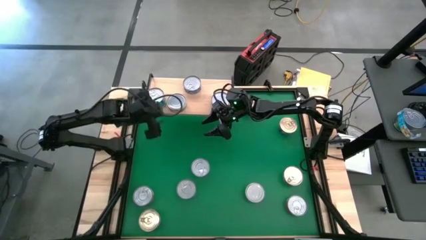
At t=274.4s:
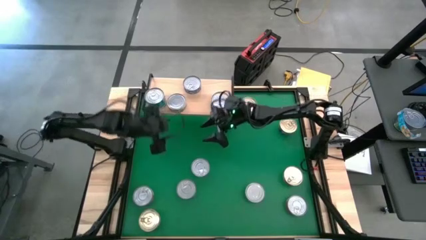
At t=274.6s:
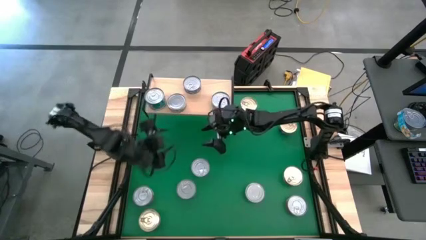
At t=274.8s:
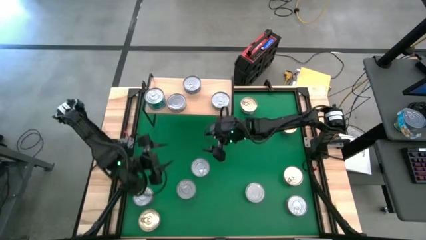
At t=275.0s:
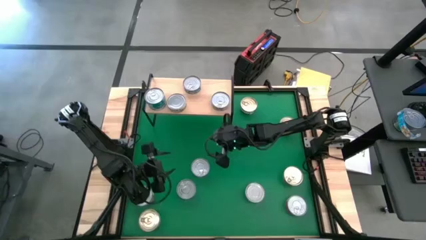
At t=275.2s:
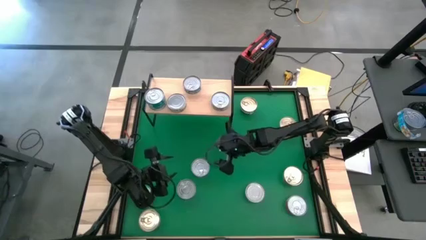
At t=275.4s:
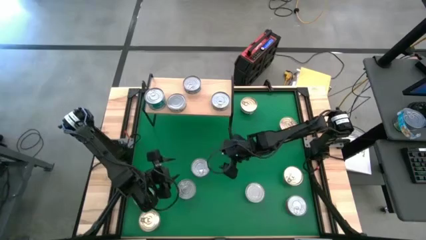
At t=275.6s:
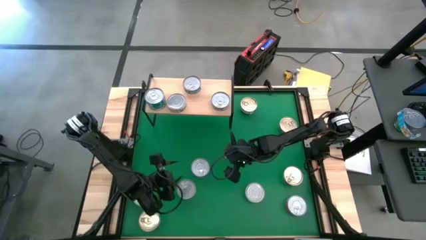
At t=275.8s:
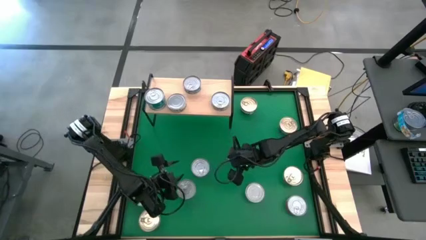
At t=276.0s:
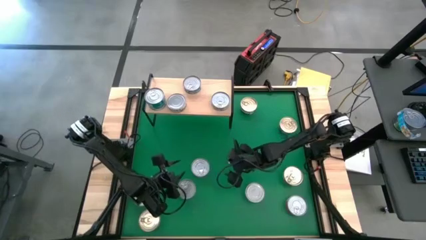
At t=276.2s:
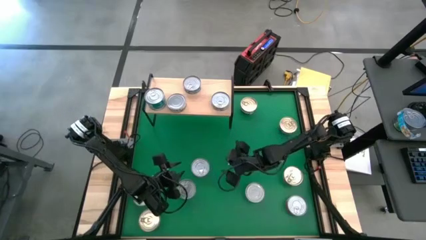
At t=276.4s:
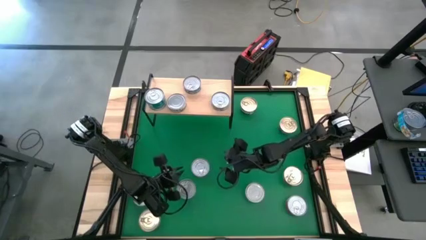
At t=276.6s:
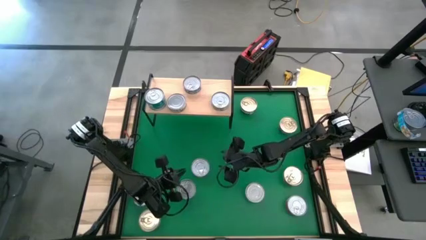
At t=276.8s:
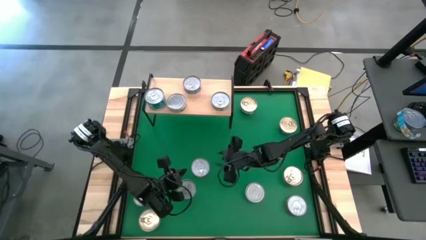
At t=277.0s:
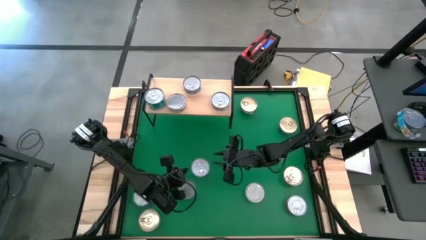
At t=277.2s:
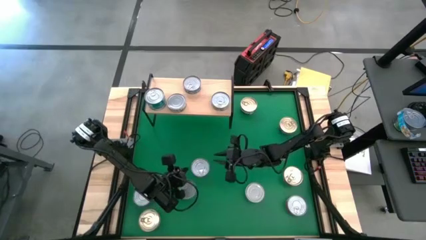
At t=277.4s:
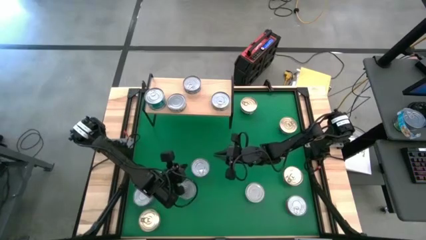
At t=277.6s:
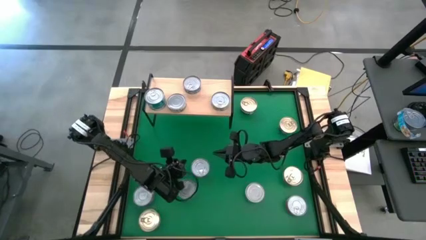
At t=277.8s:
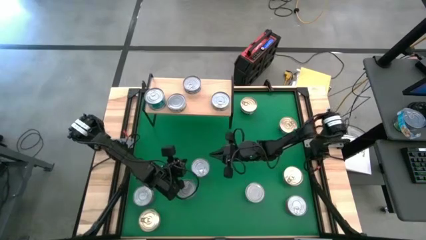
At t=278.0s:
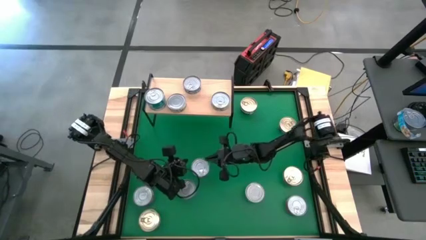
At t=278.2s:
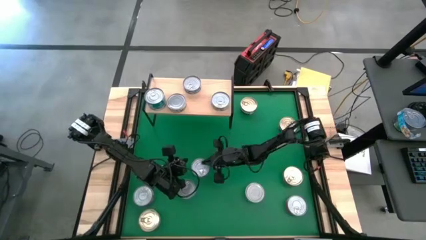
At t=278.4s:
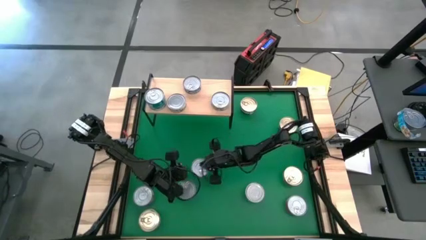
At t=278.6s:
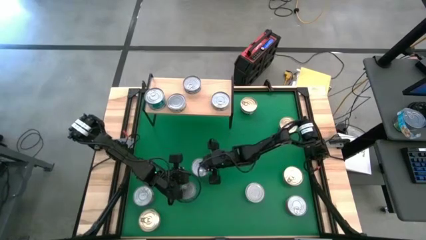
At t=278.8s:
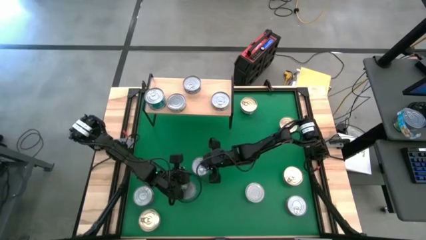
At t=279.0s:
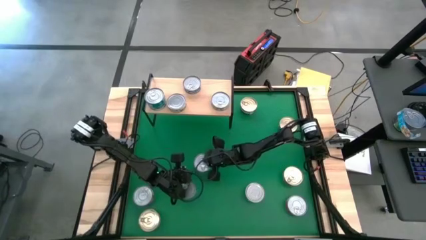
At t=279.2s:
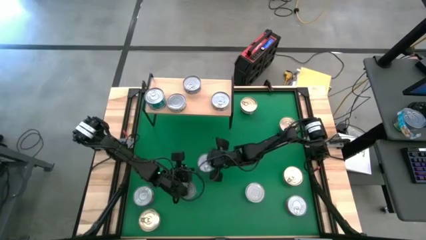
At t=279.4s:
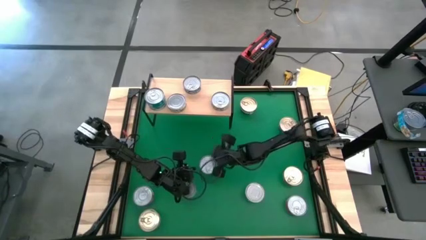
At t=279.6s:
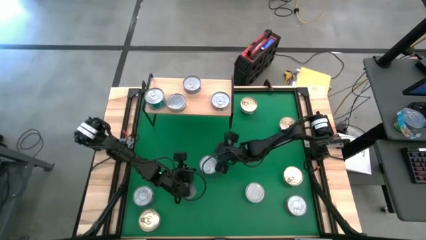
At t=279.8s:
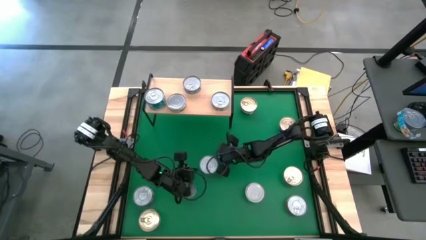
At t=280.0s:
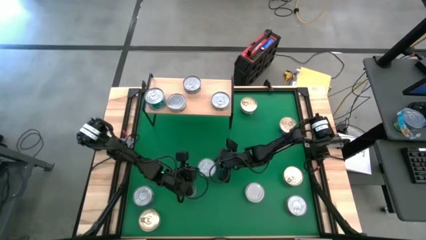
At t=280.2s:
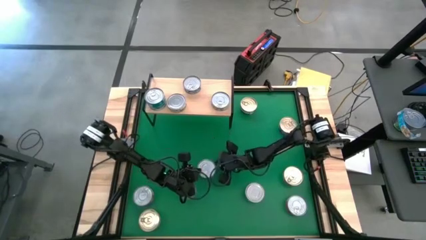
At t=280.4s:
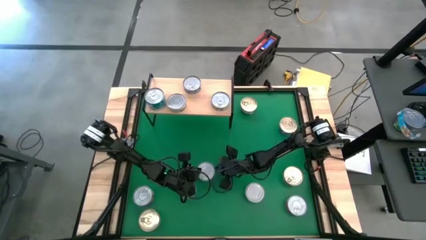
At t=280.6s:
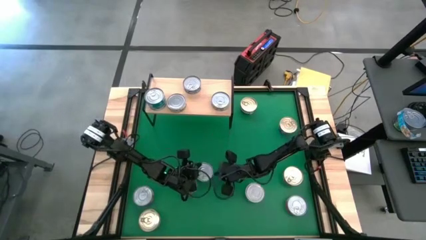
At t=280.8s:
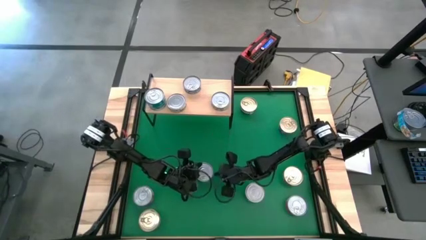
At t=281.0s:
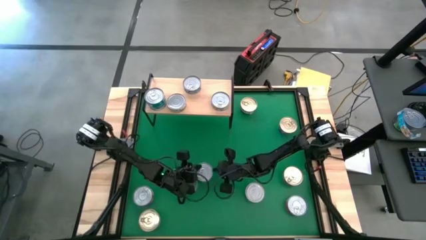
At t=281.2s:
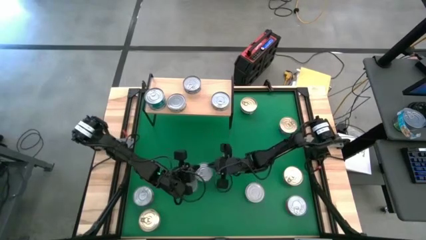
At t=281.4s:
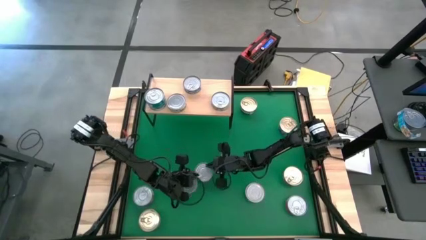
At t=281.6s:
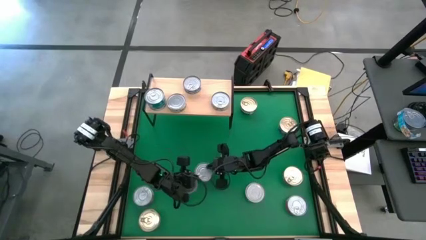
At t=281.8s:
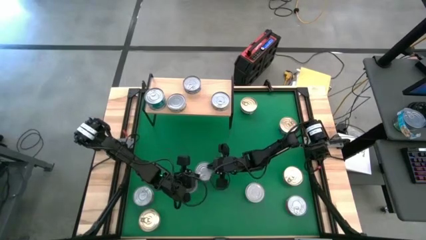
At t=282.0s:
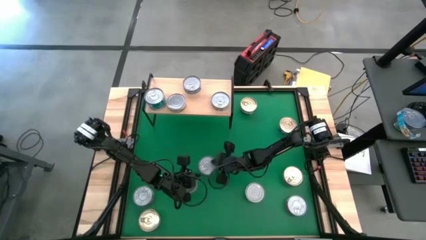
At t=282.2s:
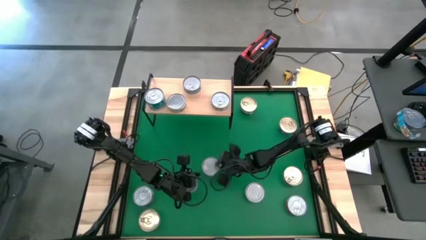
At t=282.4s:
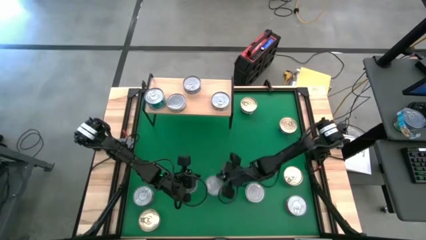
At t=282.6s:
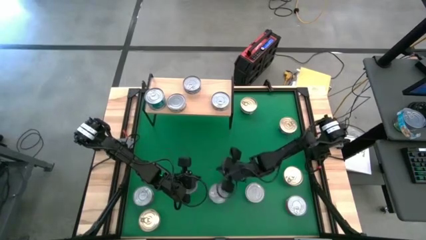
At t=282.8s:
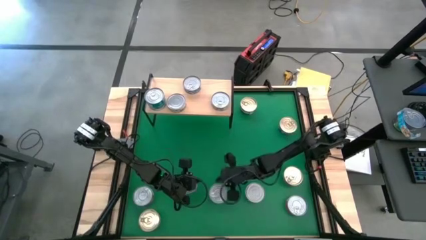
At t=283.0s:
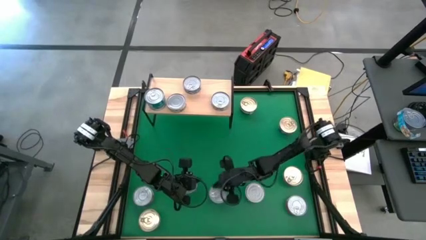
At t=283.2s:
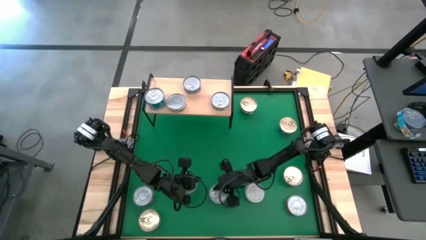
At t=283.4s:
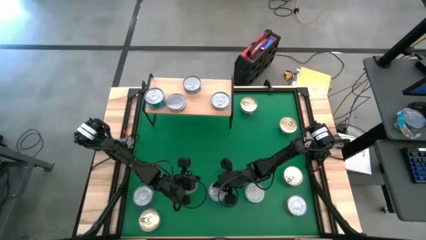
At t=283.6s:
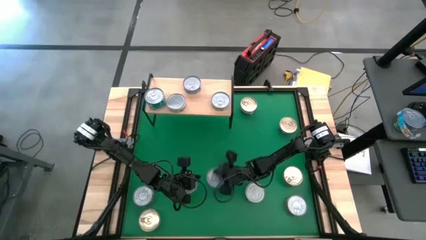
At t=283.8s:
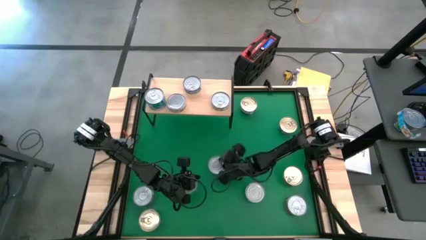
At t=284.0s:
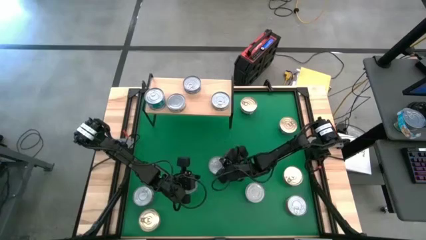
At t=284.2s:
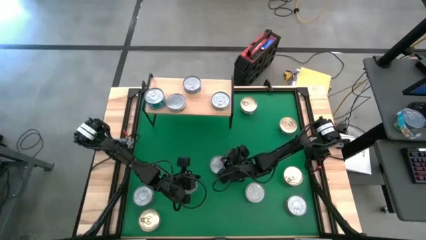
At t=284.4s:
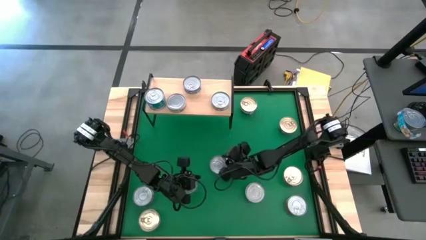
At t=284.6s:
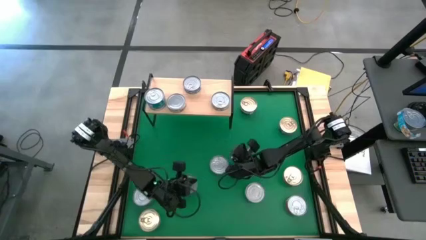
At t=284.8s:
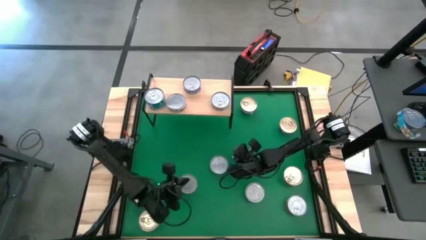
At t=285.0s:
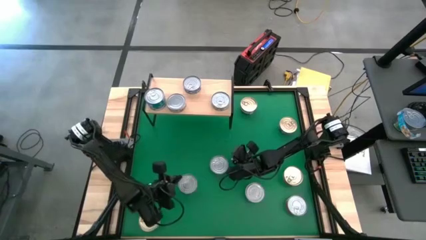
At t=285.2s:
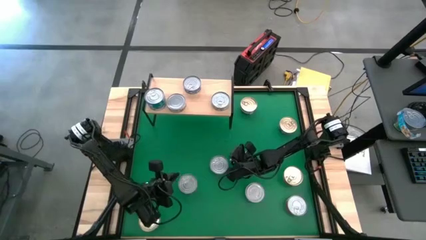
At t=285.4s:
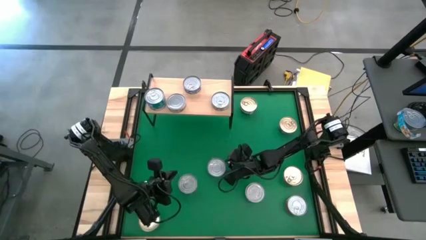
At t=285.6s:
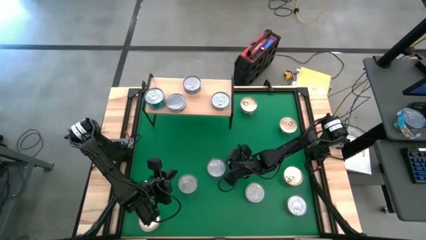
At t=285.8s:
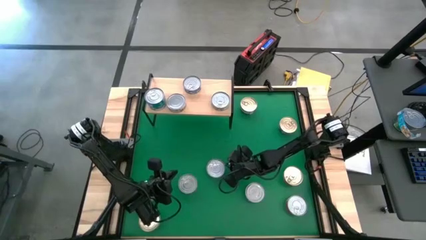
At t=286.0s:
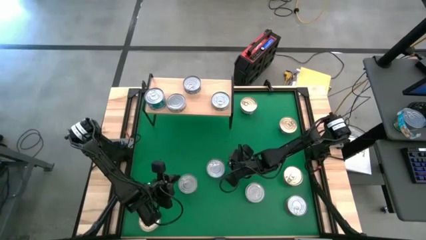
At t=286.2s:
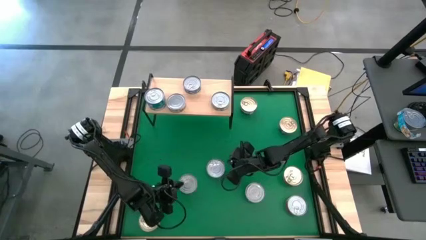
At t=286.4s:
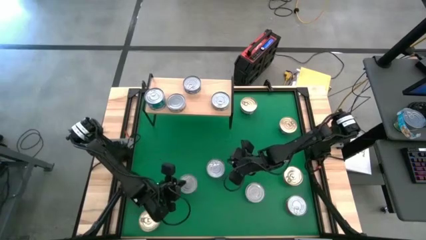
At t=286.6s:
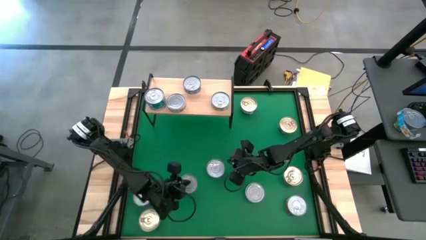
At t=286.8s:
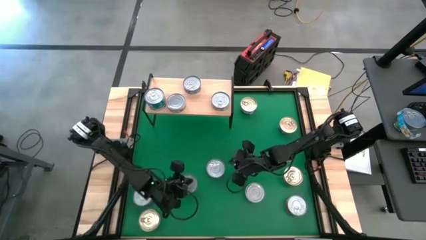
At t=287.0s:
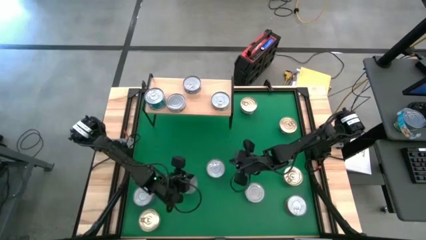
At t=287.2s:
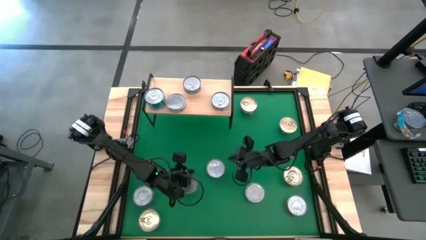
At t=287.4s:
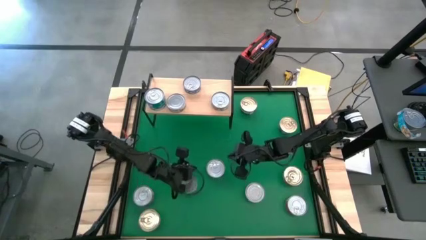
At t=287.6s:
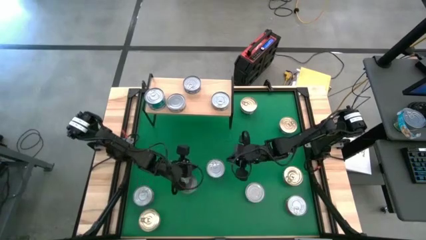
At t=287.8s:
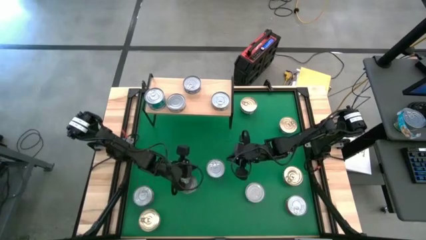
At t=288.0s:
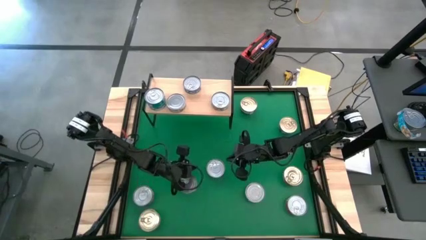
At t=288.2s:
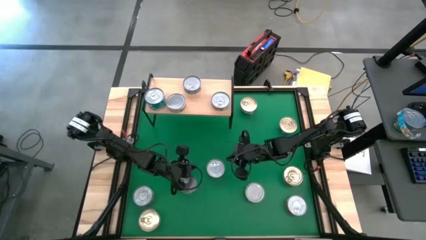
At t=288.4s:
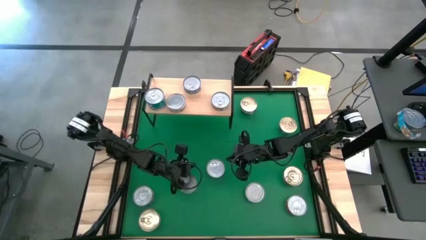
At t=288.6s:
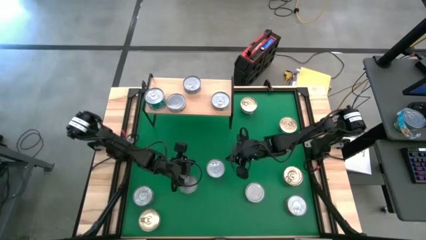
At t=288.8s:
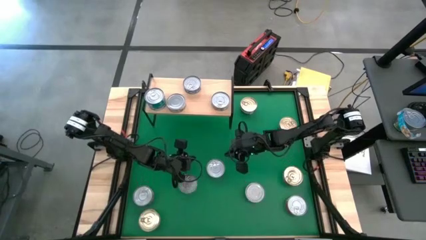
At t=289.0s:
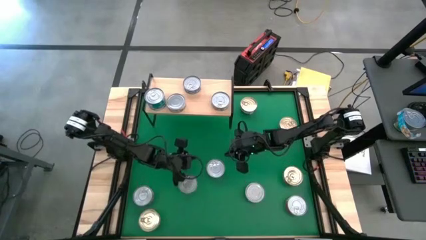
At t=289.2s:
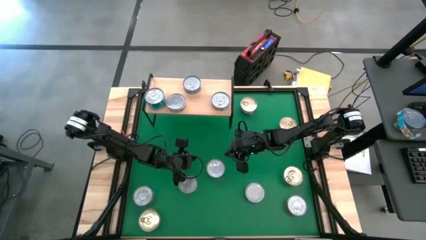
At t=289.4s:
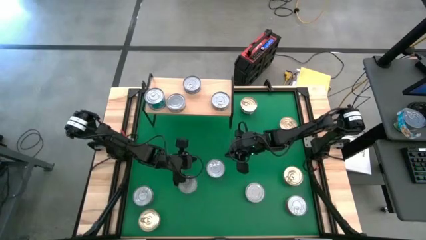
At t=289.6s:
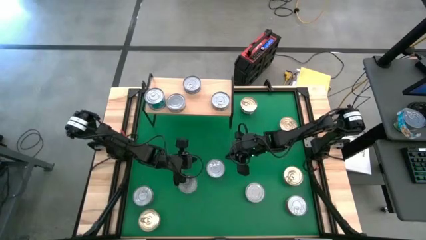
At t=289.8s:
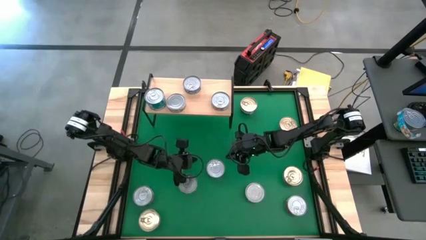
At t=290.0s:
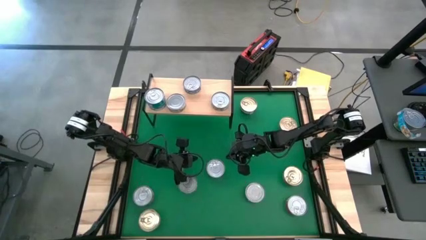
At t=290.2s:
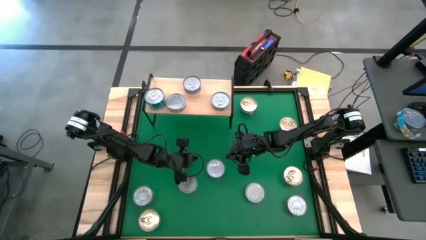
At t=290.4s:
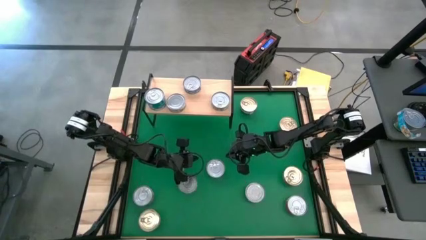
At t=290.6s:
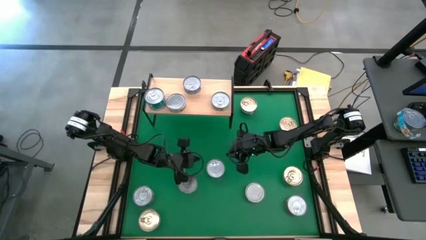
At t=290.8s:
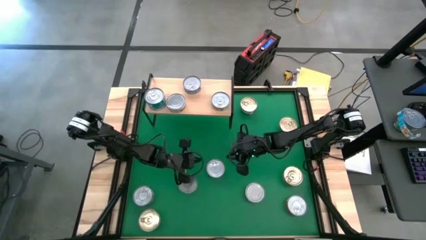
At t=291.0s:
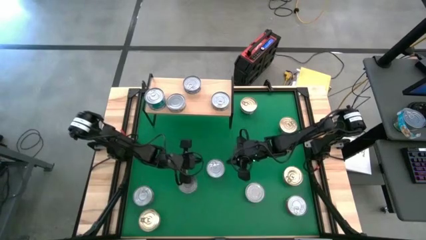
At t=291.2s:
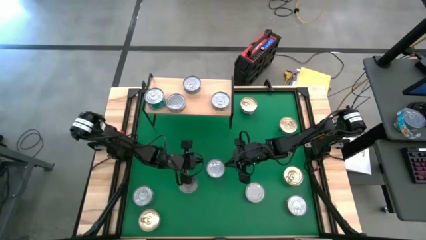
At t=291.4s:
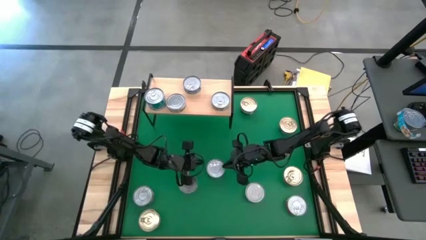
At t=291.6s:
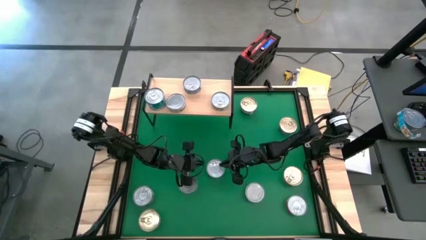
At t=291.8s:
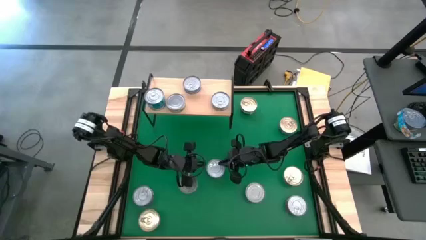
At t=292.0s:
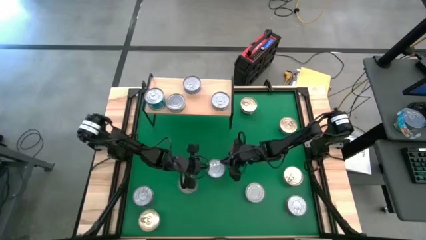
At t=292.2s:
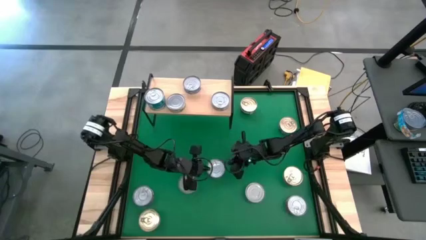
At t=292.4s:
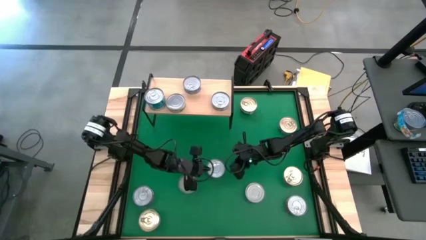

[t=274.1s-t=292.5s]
Task: Stack canned seafood by type on shelf
Put the center green tuna can on the shelf
